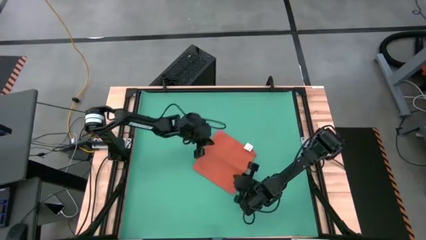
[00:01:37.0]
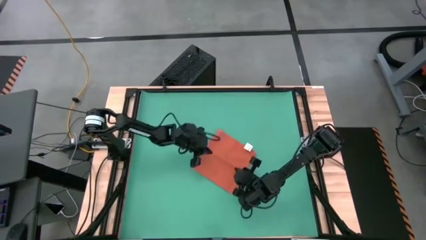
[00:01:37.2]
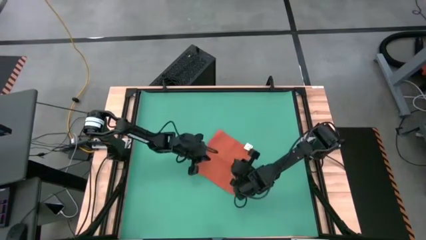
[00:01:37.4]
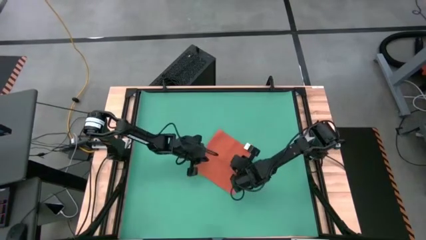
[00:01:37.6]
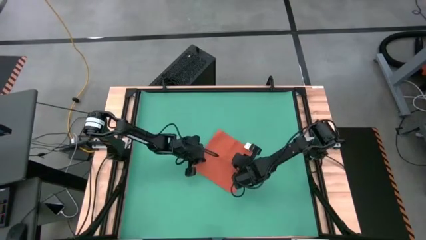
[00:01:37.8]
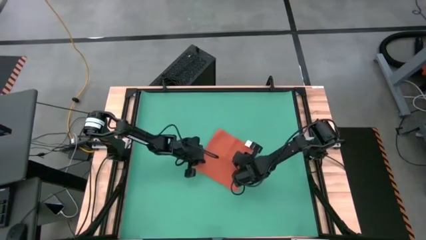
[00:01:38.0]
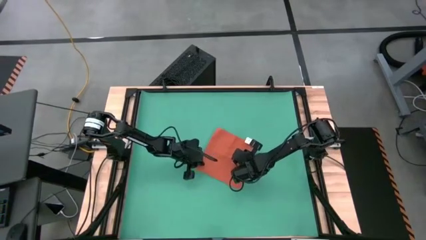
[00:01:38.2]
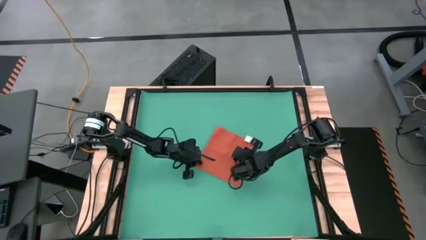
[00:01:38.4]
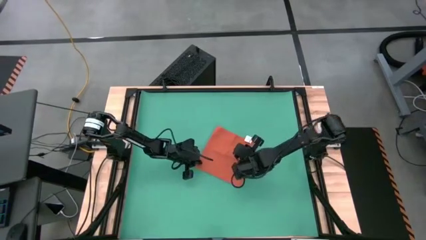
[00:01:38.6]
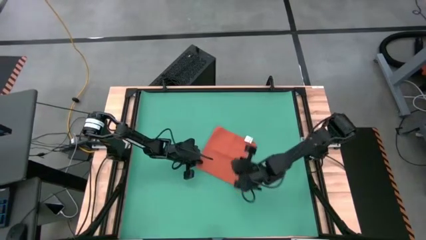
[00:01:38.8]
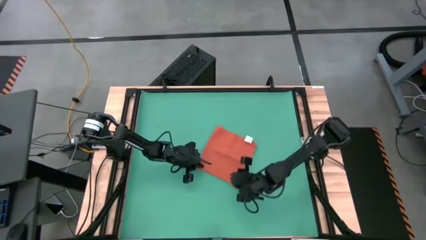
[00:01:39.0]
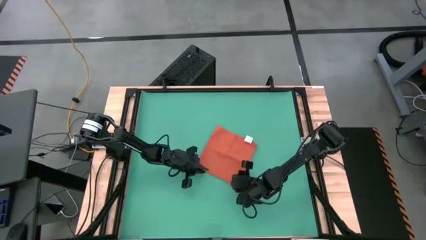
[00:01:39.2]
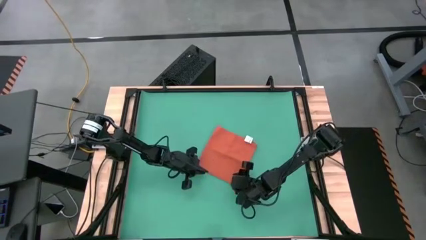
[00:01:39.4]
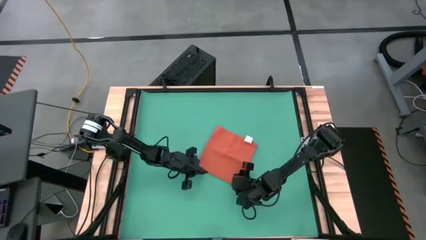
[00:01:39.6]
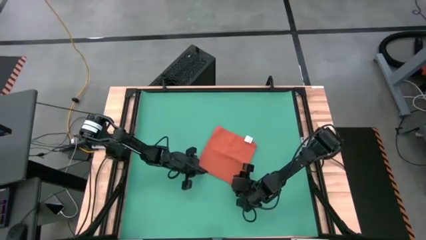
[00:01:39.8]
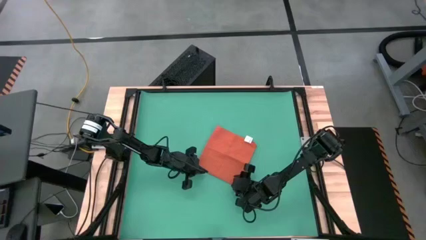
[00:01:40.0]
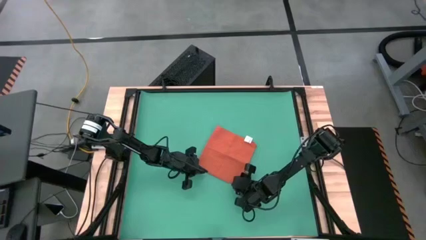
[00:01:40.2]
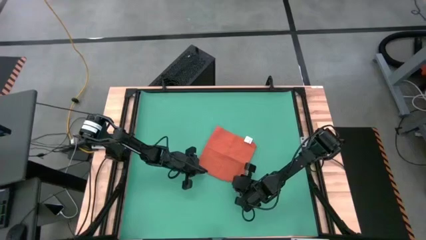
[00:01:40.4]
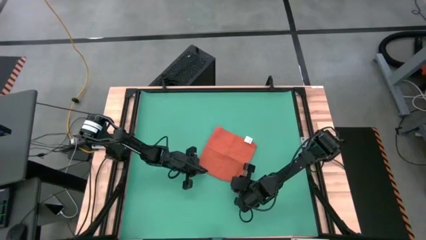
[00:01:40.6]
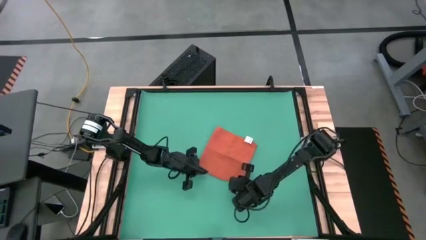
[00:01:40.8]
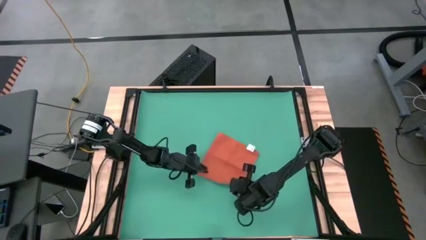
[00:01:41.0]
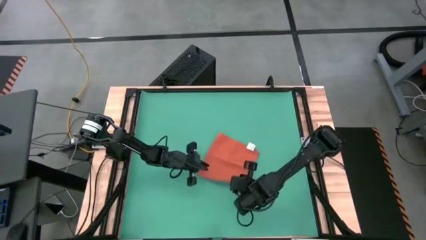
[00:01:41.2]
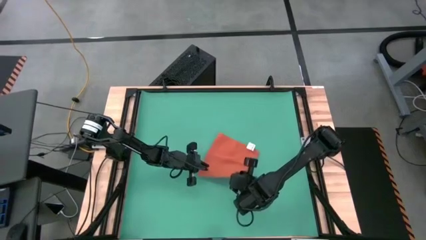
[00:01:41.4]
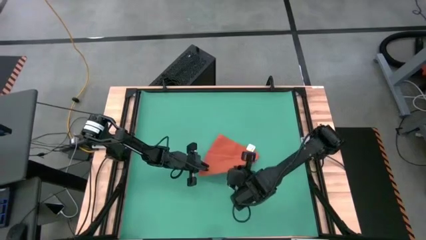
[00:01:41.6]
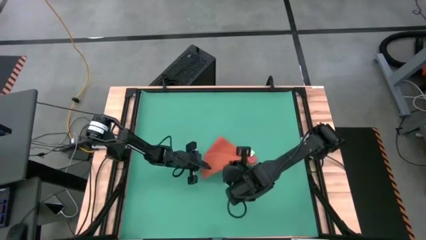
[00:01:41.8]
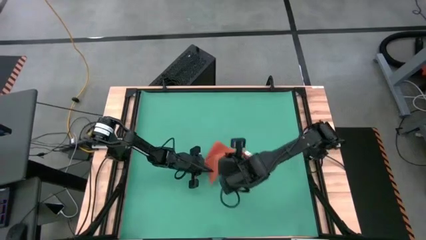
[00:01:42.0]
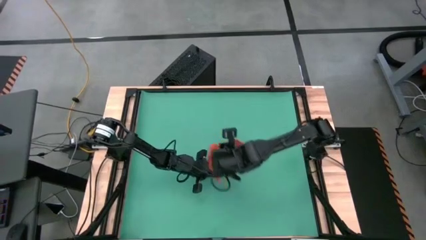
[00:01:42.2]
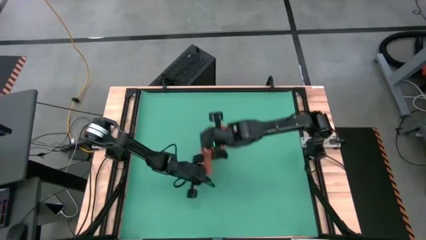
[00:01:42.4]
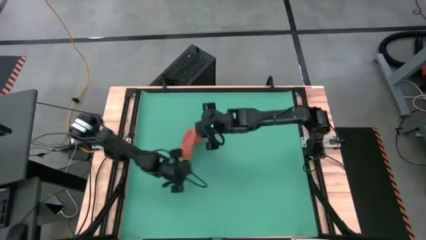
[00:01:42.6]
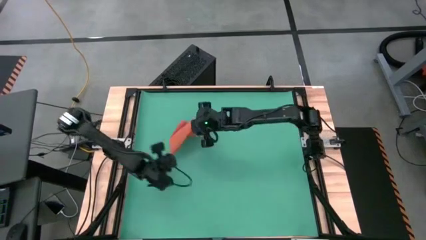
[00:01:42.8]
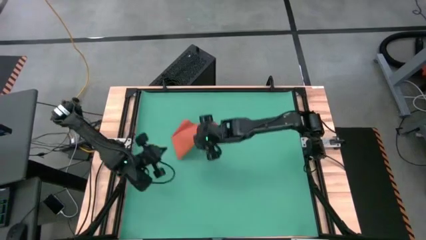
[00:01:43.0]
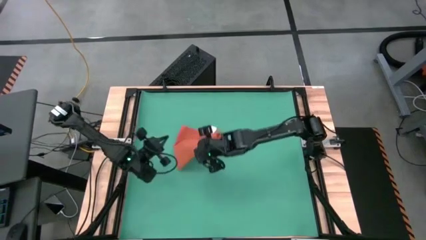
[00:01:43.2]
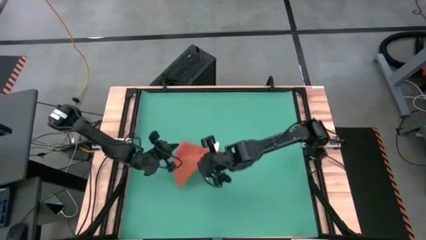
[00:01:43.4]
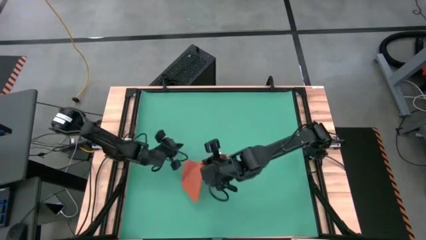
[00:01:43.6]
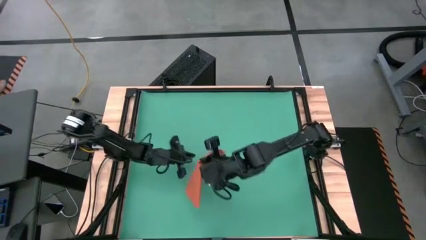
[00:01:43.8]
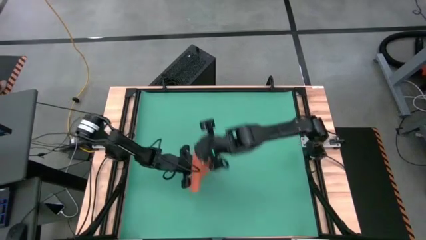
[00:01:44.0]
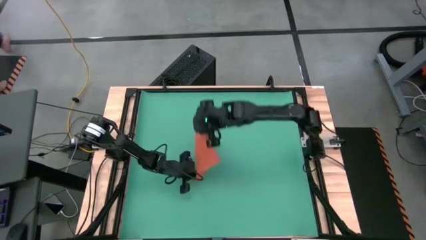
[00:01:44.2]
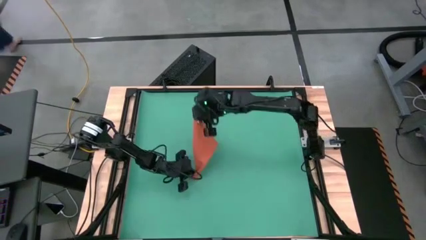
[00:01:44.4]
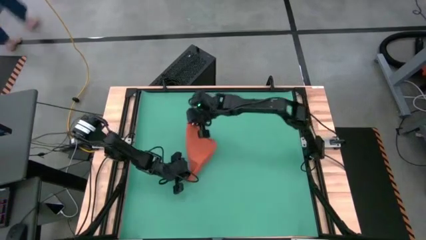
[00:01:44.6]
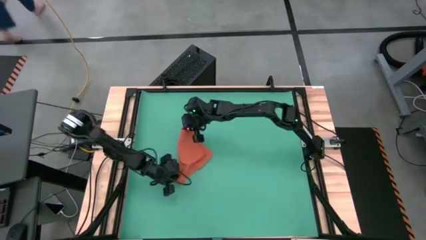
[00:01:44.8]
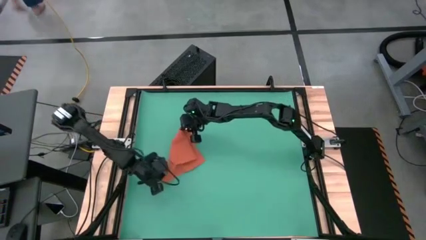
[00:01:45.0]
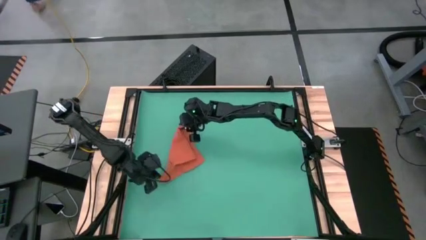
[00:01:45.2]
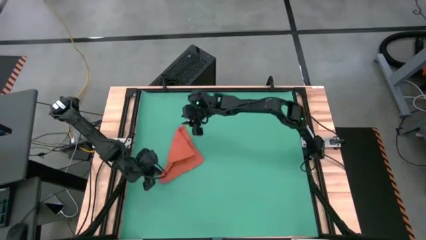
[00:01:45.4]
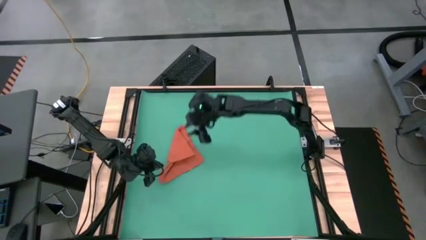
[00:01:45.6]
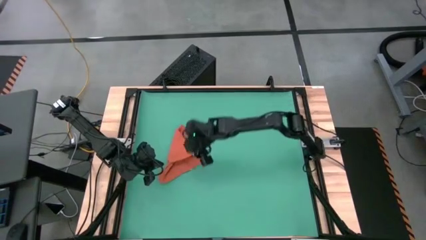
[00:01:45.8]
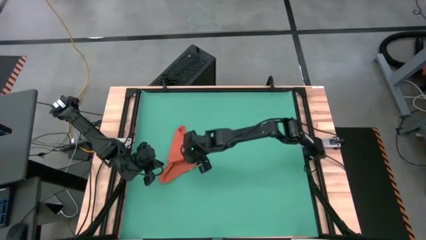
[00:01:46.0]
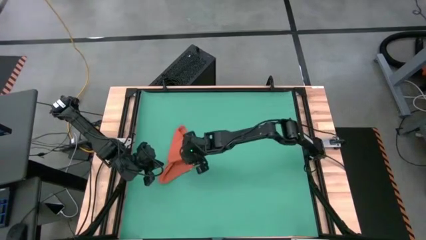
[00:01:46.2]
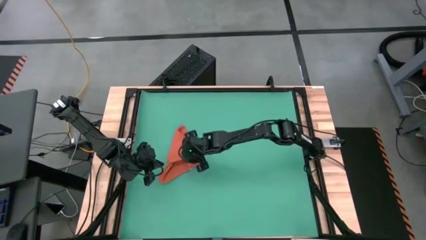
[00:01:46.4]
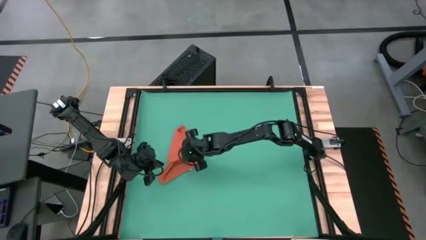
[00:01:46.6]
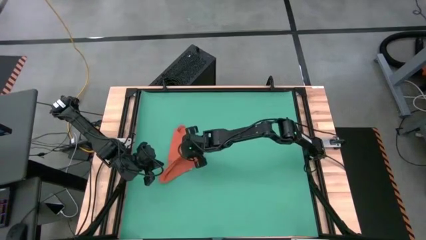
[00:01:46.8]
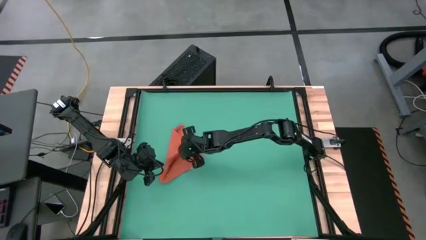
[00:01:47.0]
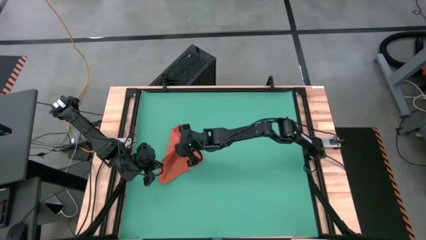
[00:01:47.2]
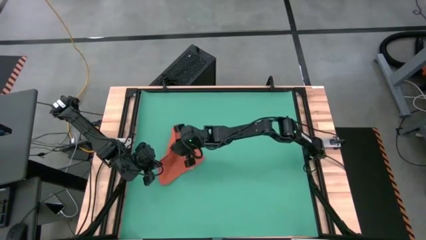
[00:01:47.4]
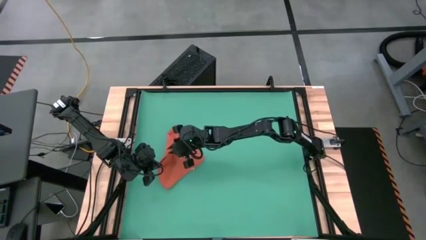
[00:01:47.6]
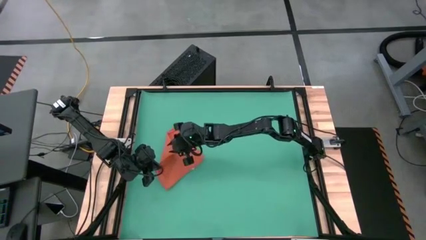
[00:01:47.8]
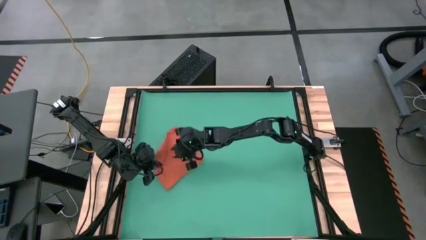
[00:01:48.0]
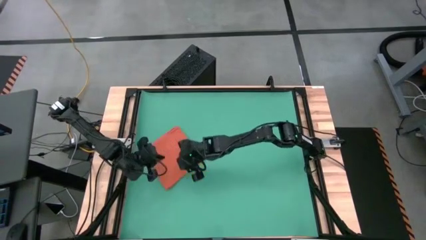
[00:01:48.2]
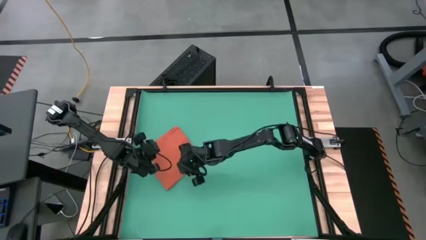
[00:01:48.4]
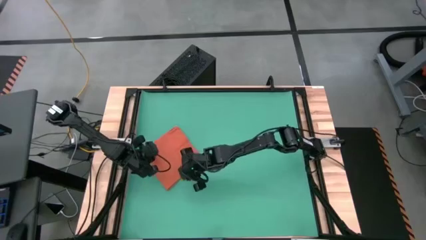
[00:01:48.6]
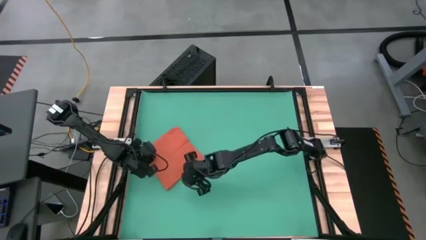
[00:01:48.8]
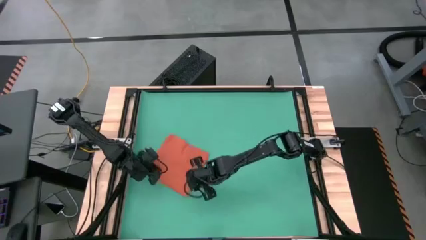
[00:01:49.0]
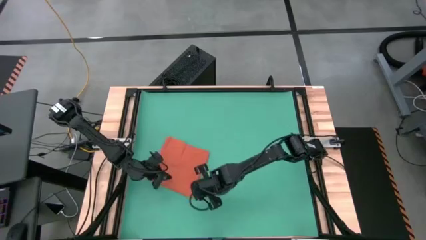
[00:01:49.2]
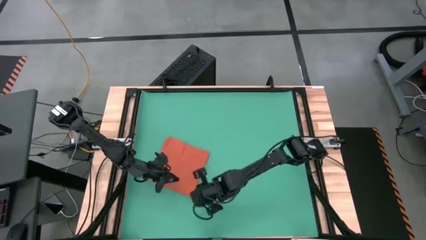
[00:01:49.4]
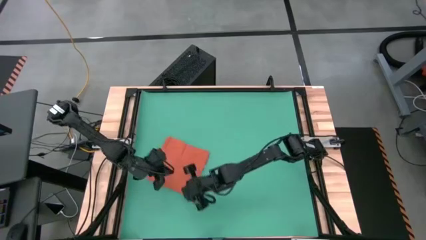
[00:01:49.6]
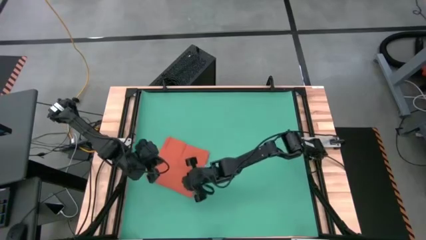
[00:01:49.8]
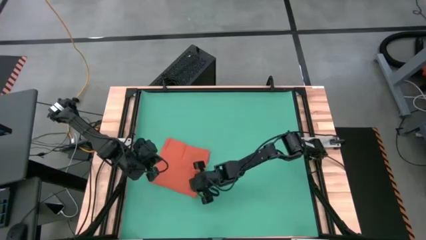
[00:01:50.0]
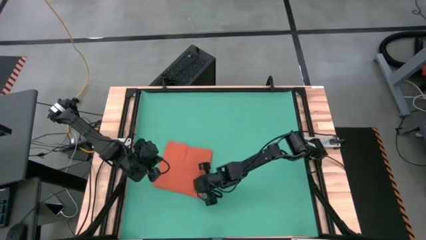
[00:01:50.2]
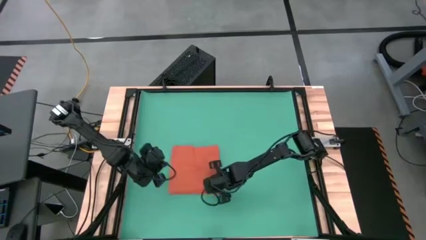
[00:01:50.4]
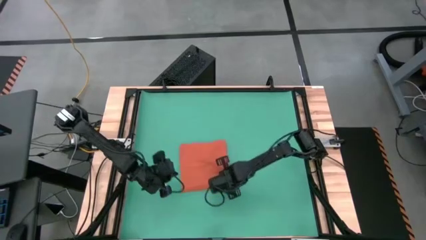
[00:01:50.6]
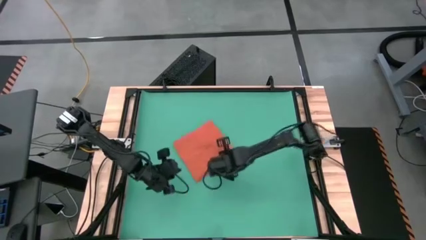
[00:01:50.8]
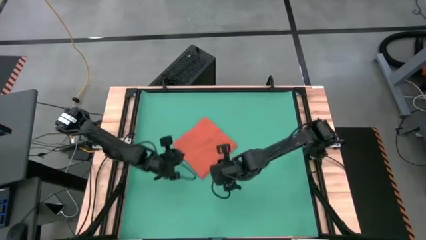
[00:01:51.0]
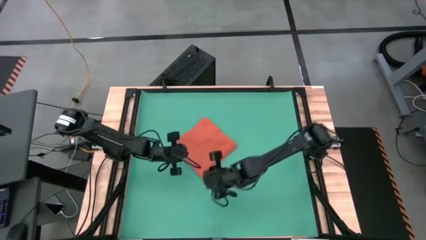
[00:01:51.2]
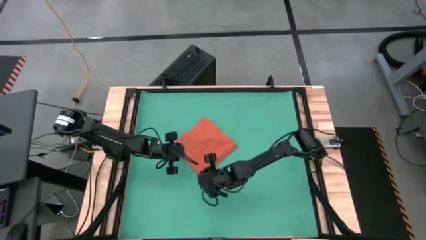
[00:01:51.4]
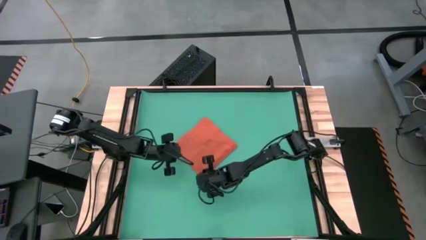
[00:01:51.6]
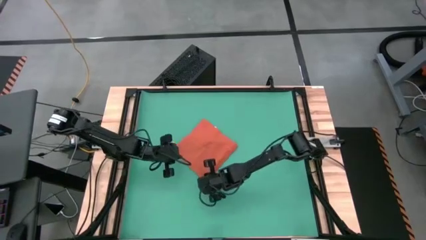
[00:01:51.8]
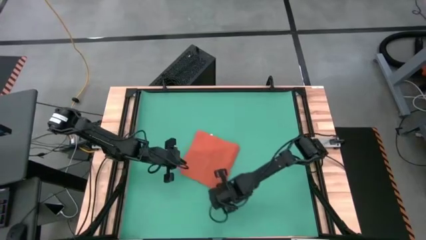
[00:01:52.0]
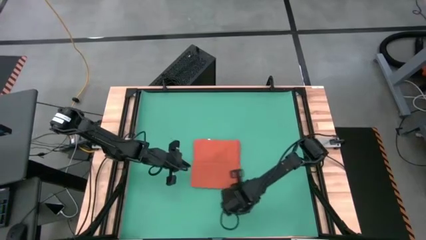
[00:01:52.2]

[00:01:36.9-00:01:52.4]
Task: Roll towel
Fold the orange towel
